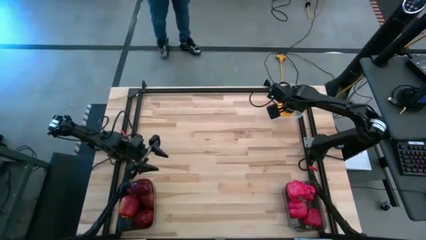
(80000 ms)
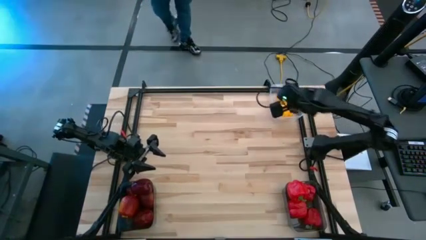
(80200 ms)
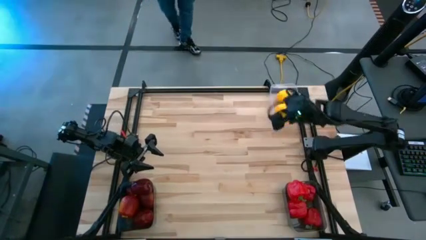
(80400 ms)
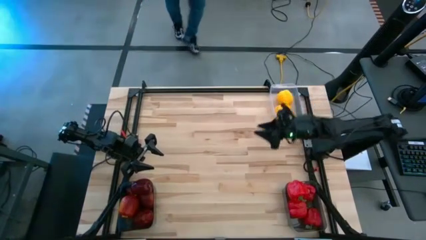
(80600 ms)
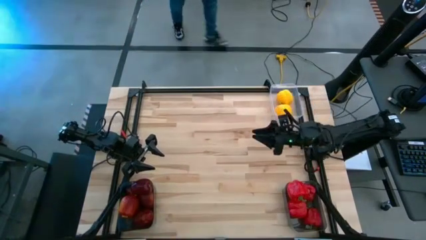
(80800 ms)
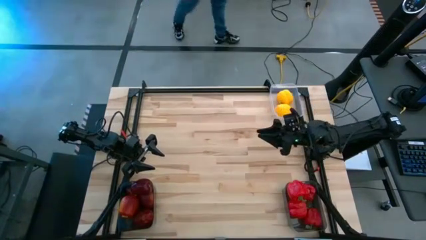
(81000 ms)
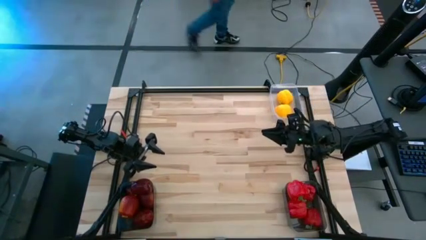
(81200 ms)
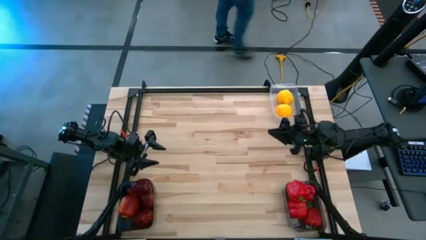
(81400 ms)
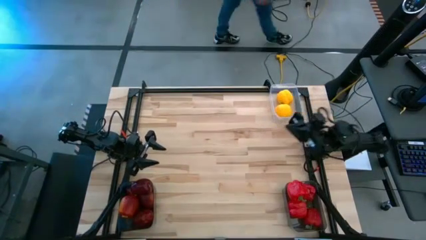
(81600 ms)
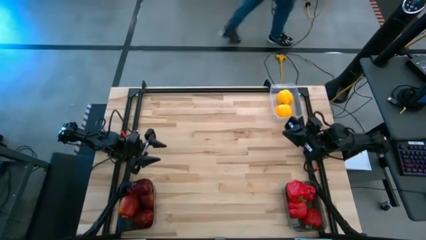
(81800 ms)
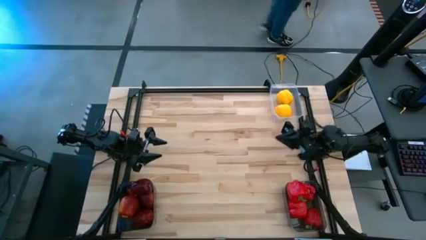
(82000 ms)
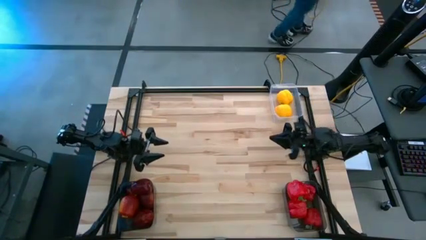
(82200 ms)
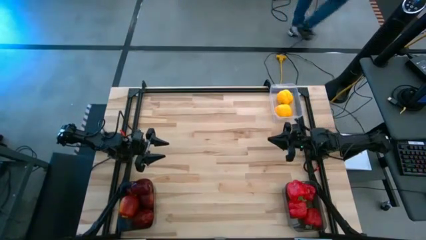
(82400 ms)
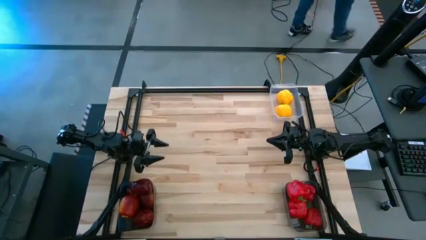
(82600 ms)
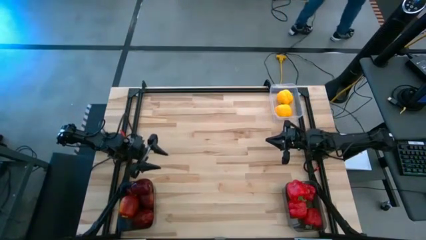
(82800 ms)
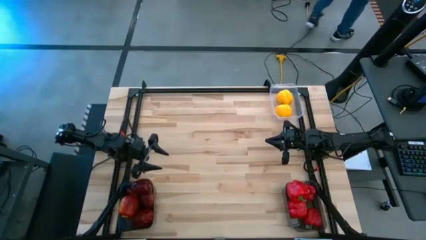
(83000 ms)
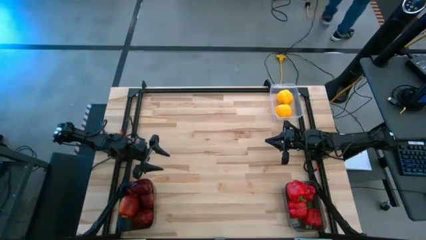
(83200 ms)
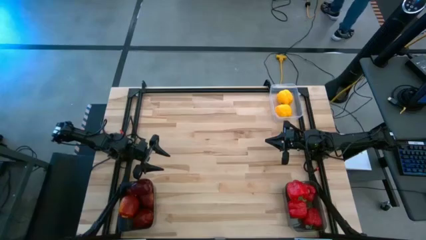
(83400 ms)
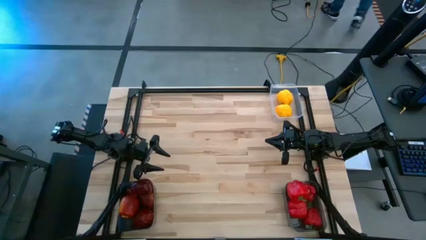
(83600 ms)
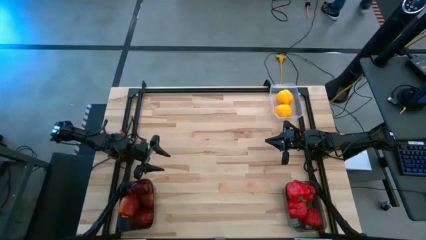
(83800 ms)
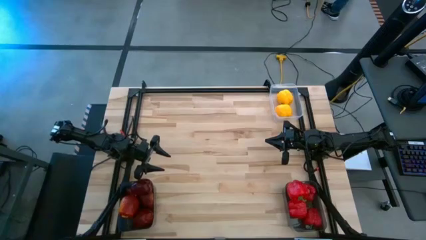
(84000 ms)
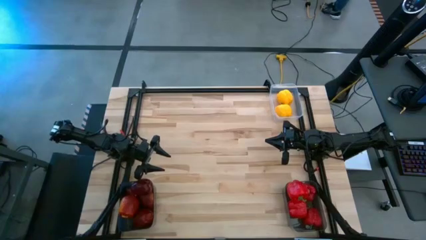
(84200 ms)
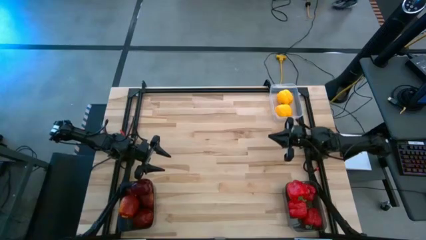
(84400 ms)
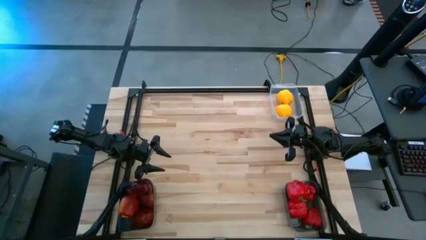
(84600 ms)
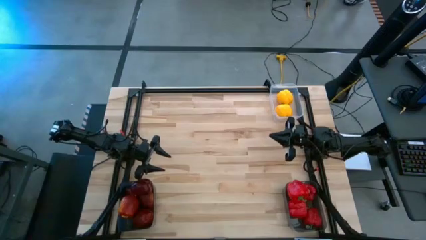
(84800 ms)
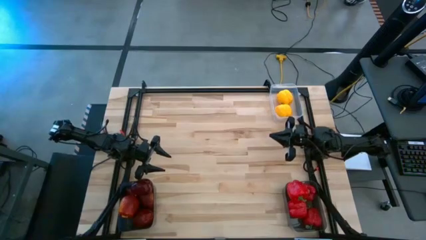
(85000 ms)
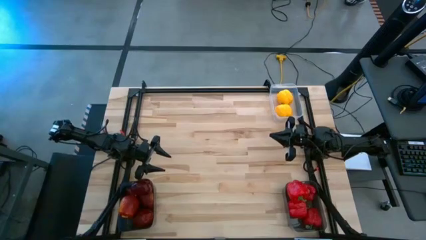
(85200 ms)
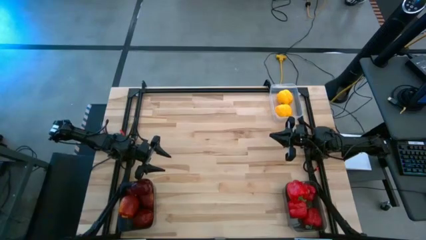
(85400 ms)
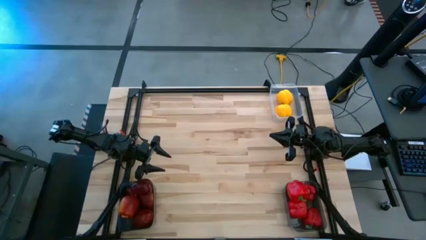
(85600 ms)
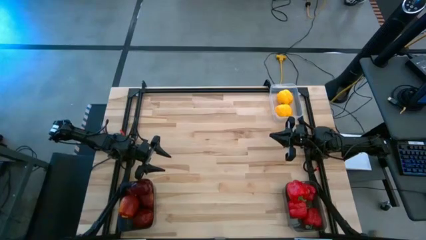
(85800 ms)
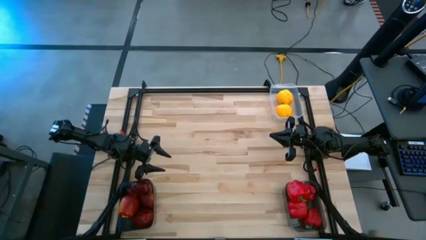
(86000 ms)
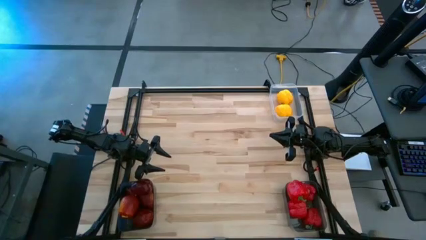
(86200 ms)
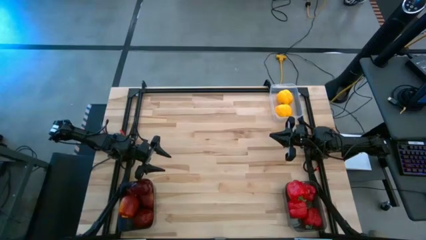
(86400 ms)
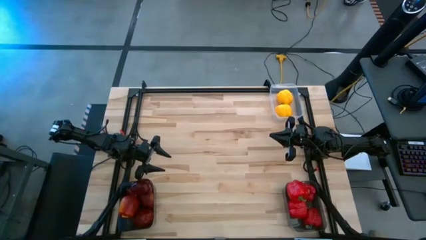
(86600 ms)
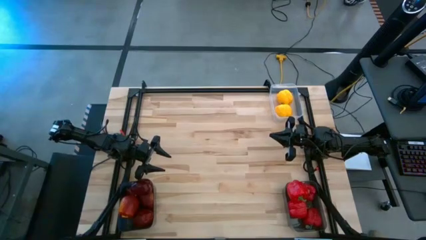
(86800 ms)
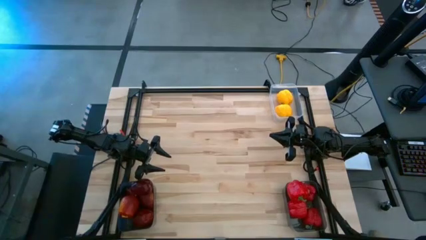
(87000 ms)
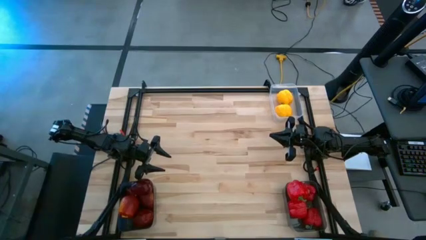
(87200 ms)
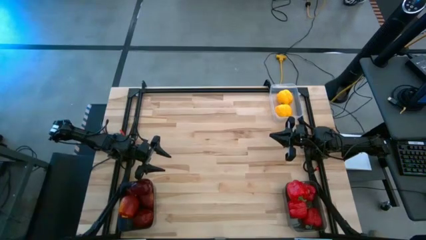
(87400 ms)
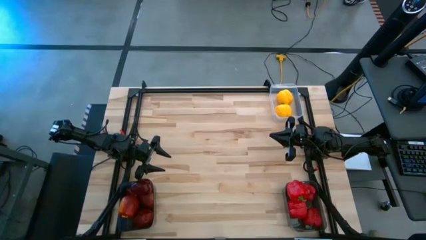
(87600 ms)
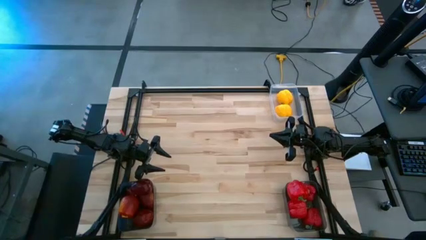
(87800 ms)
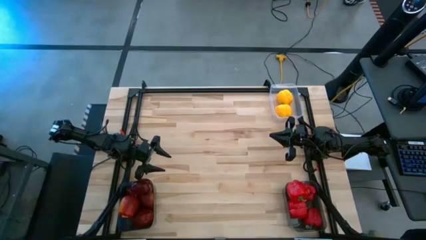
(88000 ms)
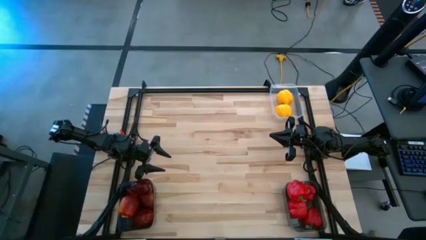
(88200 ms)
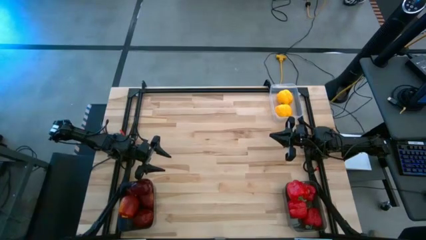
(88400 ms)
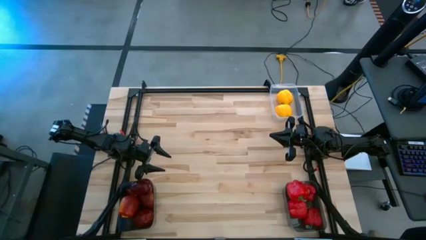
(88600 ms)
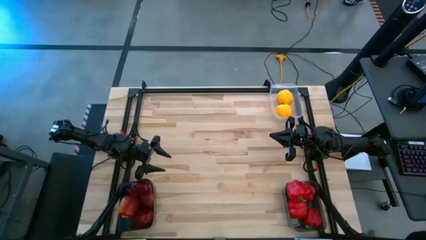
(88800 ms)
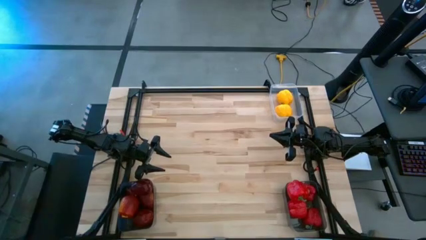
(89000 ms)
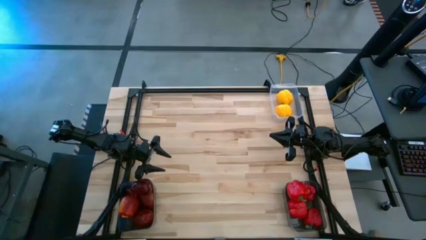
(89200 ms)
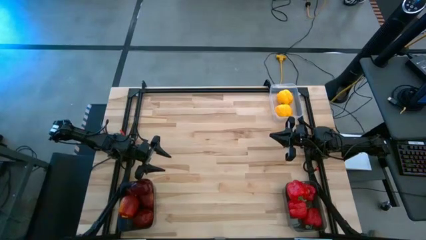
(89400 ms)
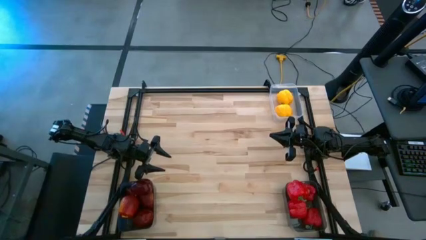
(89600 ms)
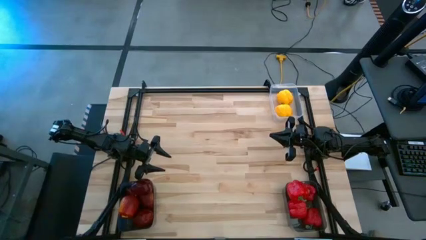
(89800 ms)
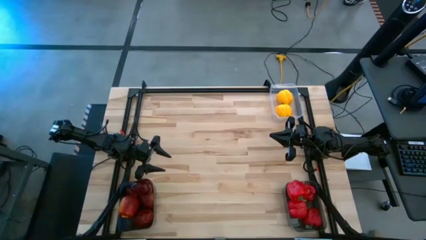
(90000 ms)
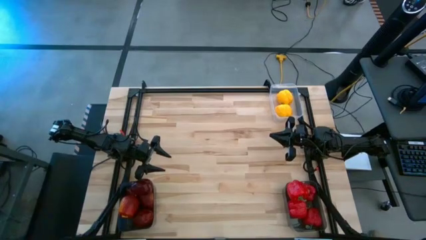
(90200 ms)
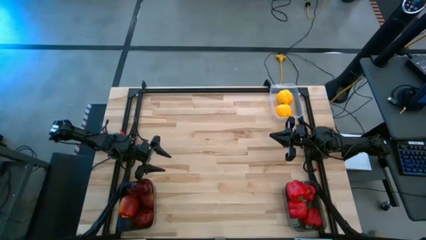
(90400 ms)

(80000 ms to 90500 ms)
Task: Sort produce into baskets
Return to Home Position

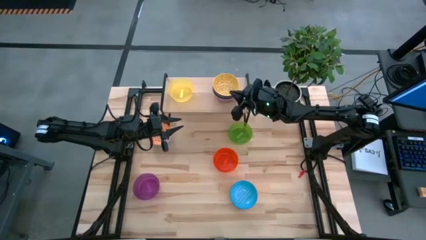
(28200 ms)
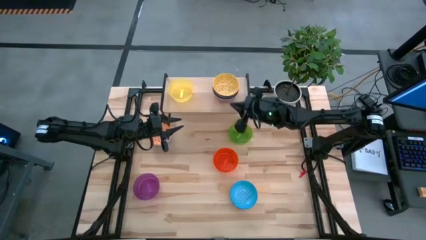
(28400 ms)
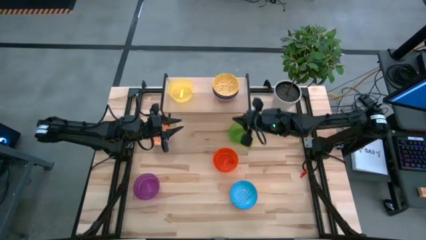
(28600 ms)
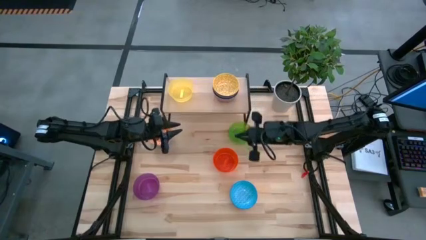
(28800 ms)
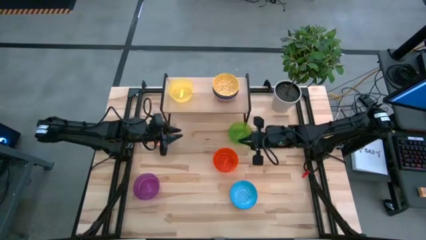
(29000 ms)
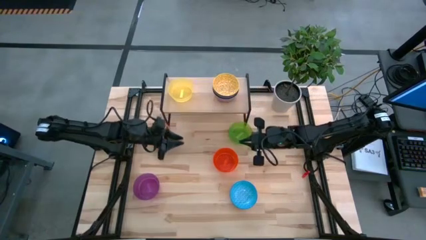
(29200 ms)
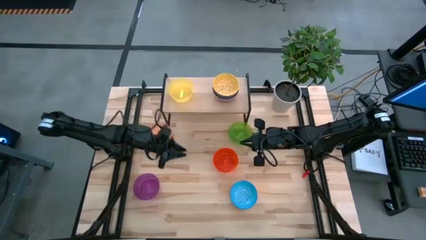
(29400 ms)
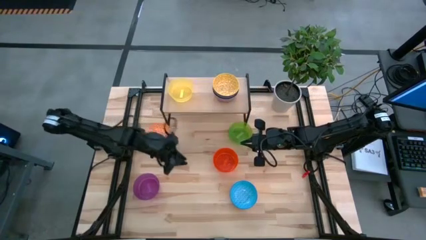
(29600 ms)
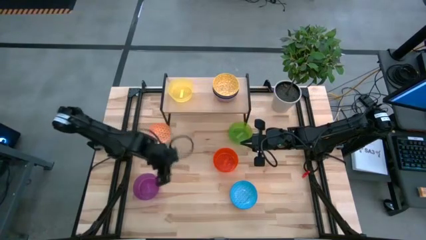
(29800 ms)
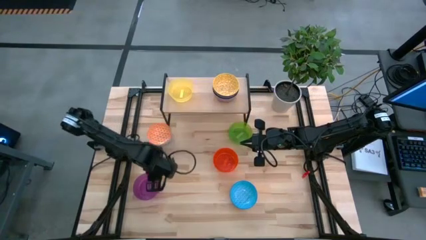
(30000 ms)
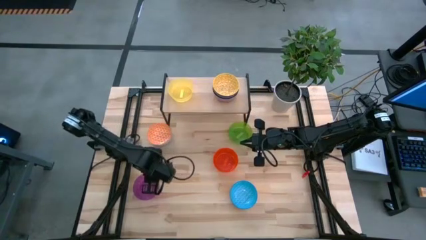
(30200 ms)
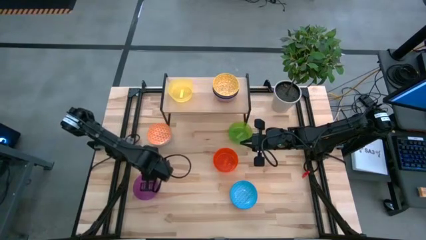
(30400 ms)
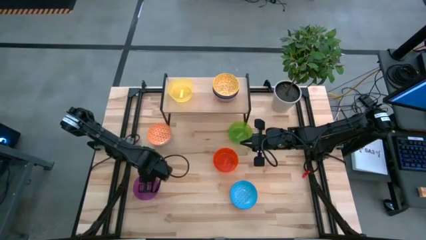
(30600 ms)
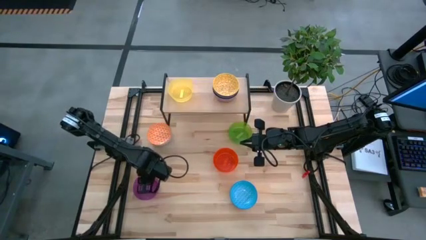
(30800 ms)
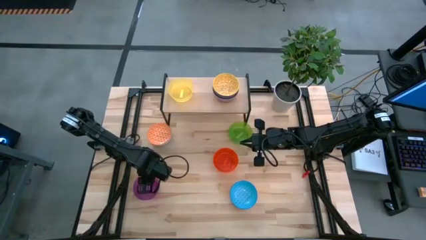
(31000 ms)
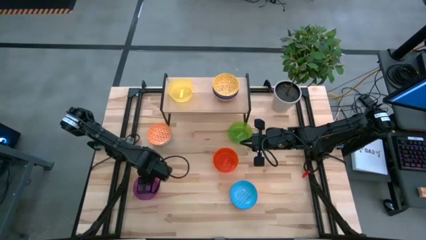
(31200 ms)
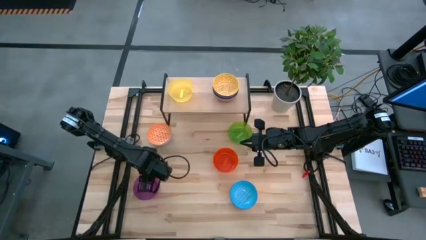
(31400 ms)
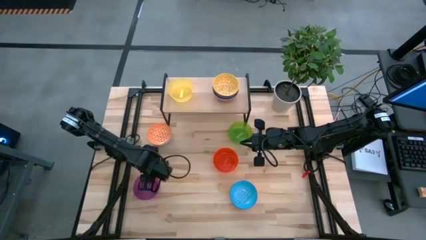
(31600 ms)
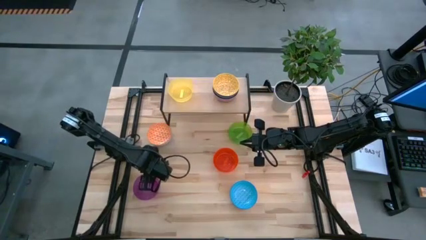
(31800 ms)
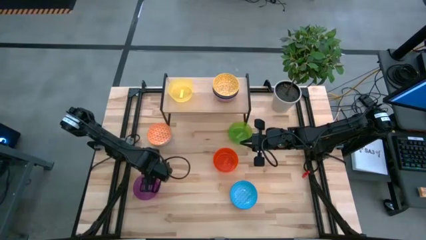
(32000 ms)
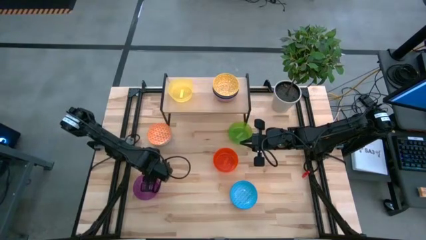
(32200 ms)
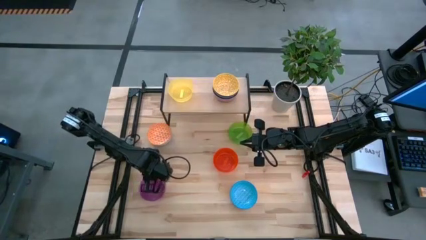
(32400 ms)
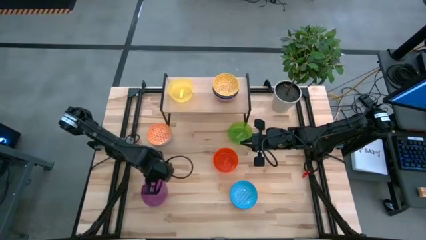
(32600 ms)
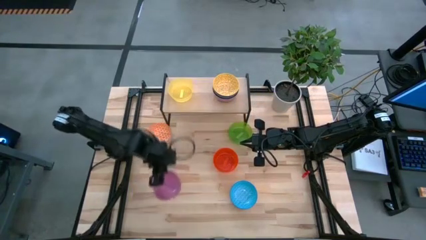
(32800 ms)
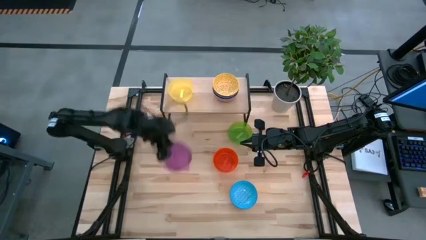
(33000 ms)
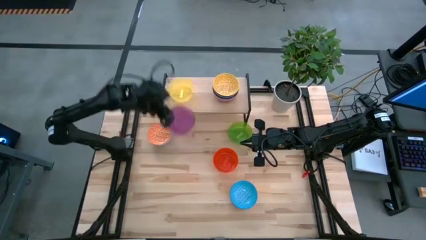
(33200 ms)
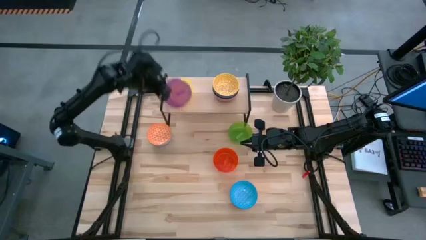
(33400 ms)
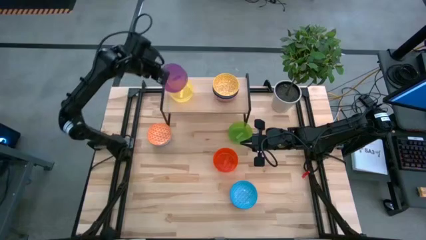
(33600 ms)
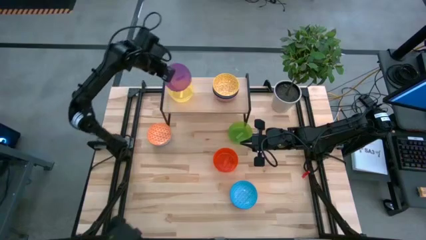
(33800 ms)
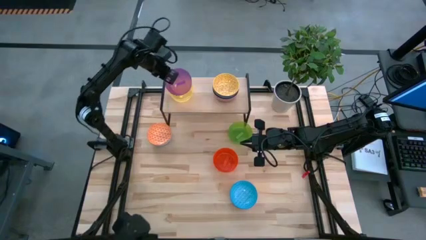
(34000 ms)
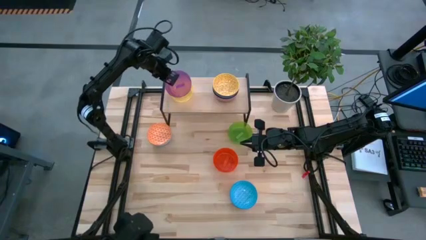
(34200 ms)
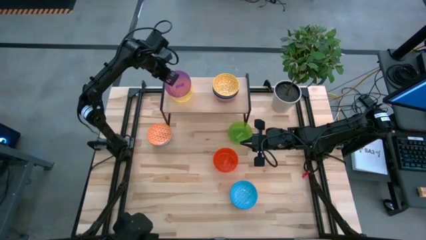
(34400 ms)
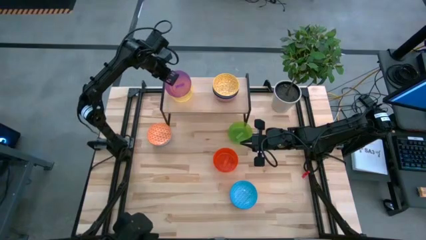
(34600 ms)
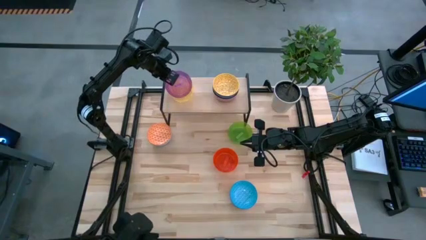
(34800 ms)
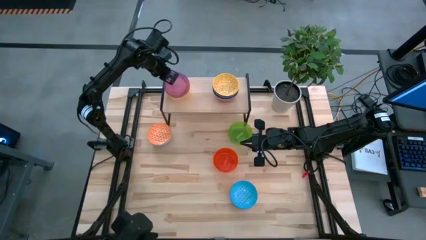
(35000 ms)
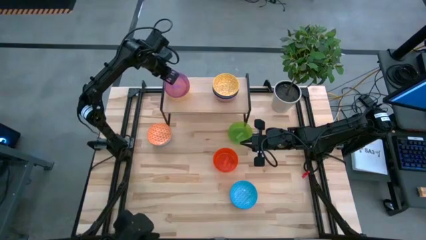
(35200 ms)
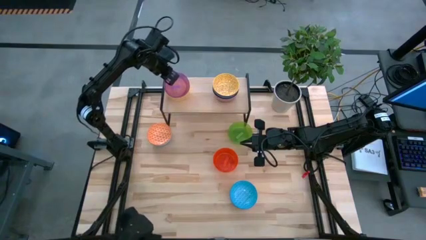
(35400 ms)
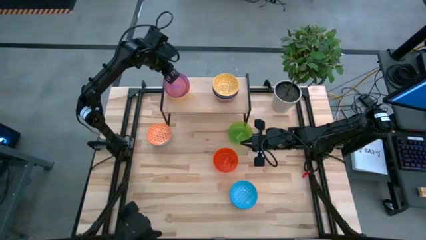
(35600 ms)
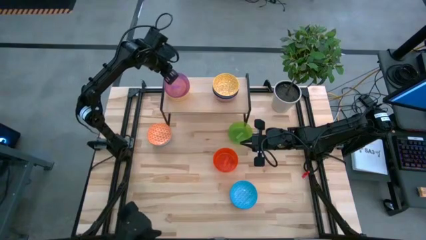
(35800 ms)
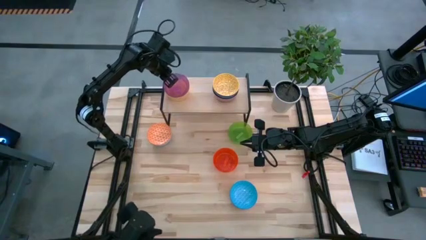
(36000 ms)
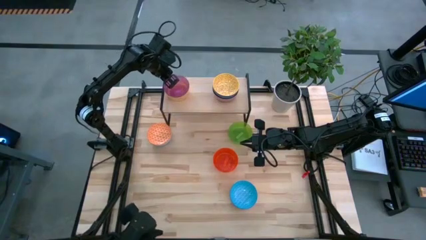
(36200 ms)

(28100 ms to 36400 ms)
Task: Place and stack bowls onto a shelf
Stack the violet bowl on top of the yellow bowl on the shelf
